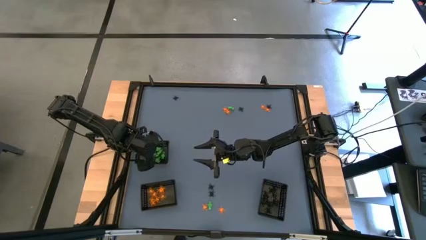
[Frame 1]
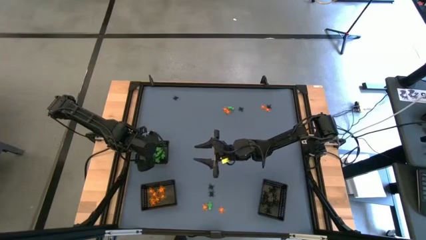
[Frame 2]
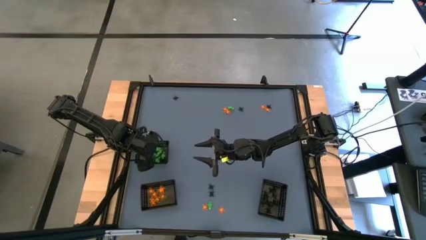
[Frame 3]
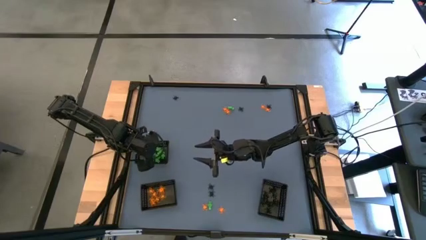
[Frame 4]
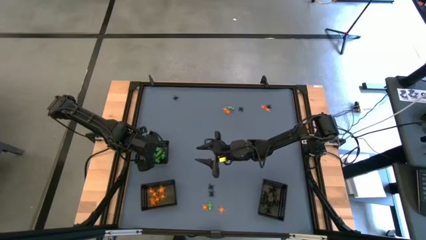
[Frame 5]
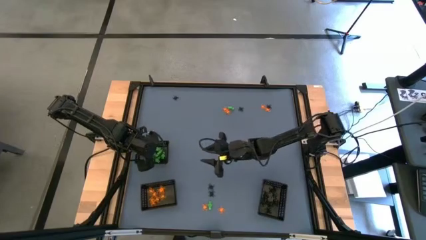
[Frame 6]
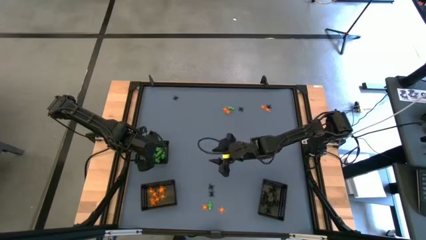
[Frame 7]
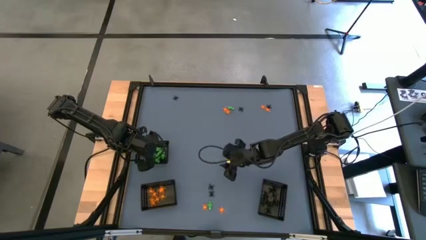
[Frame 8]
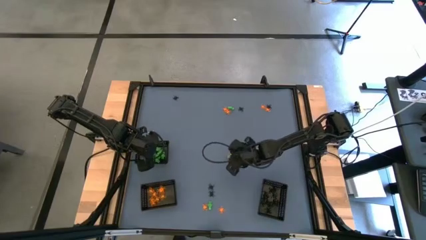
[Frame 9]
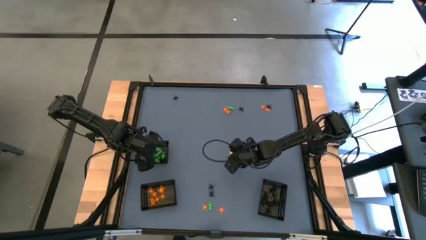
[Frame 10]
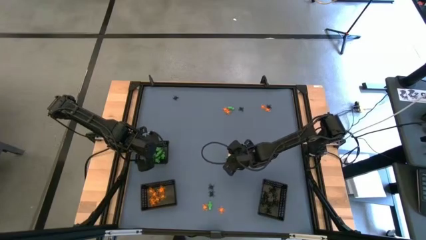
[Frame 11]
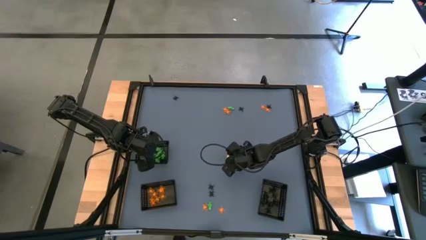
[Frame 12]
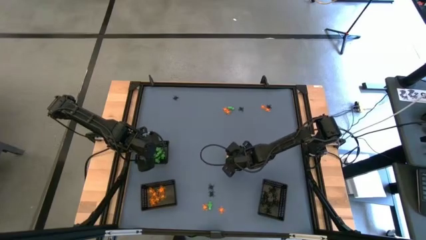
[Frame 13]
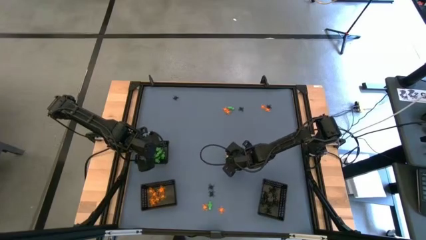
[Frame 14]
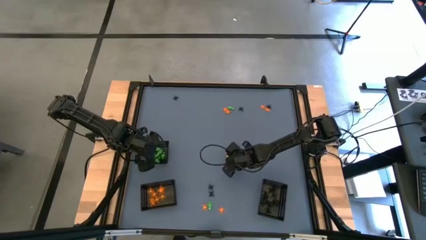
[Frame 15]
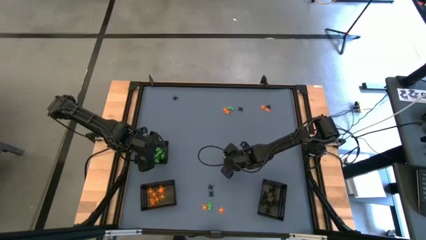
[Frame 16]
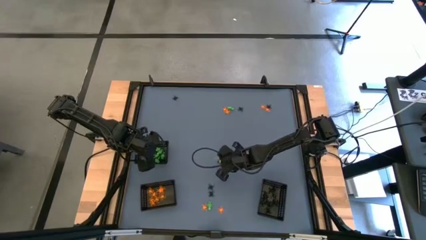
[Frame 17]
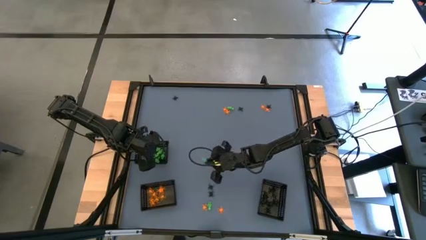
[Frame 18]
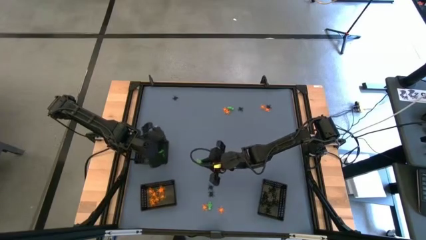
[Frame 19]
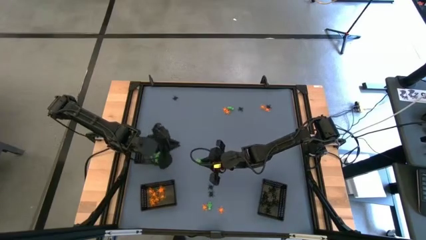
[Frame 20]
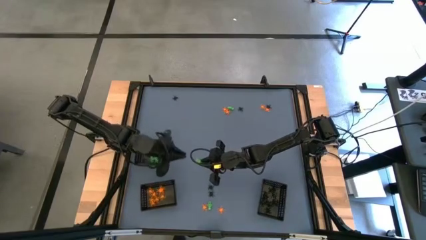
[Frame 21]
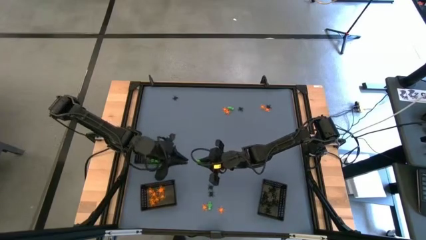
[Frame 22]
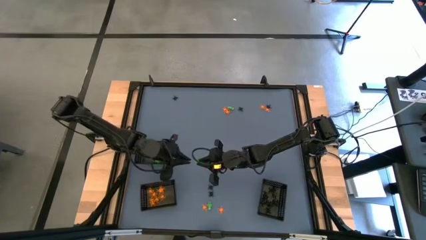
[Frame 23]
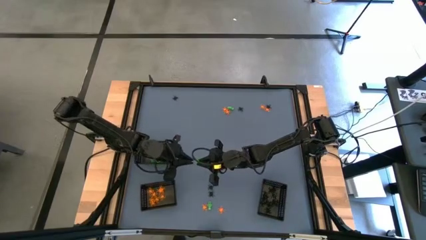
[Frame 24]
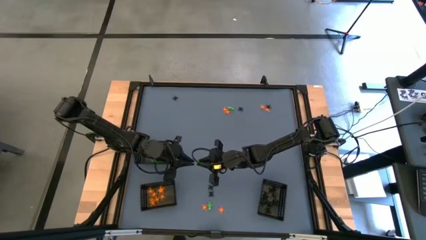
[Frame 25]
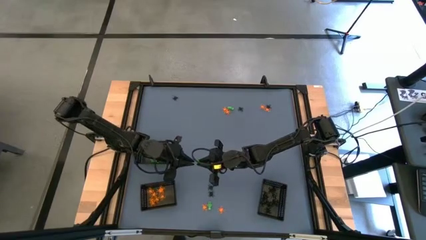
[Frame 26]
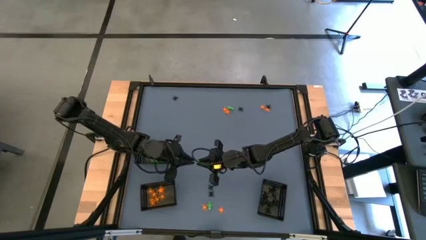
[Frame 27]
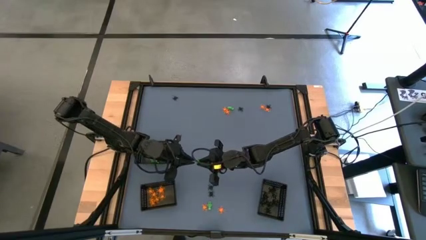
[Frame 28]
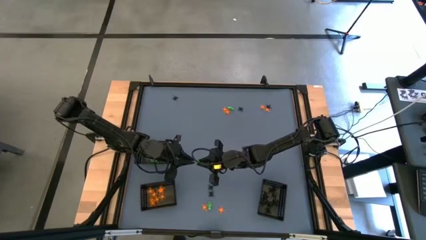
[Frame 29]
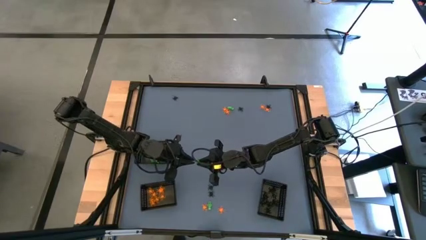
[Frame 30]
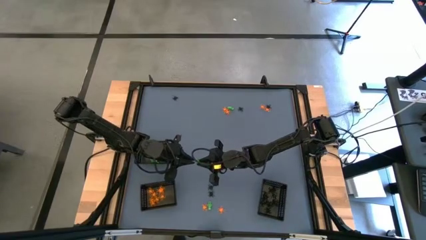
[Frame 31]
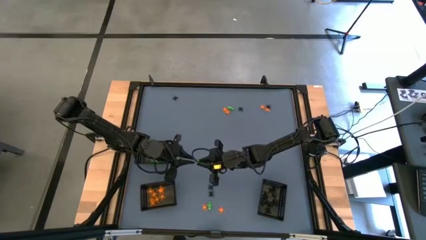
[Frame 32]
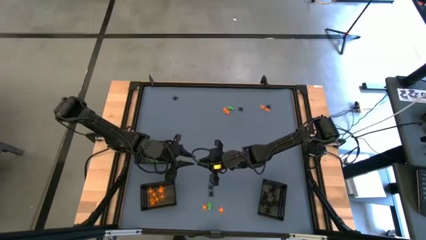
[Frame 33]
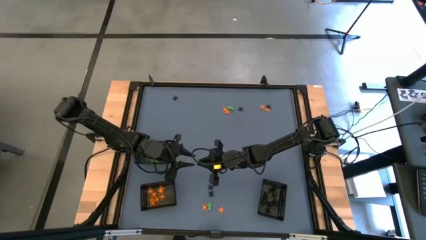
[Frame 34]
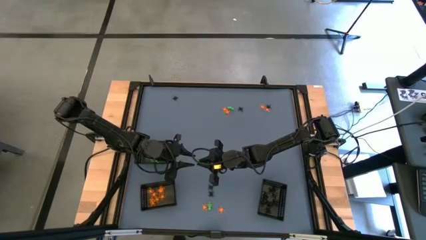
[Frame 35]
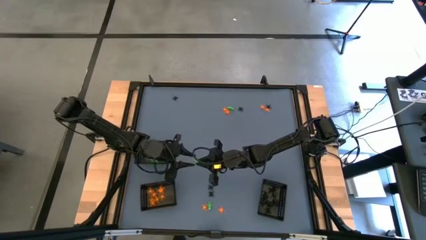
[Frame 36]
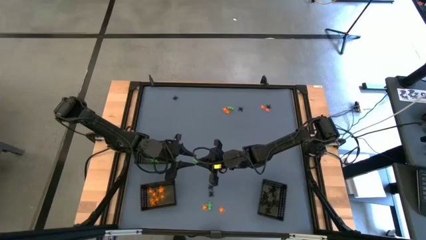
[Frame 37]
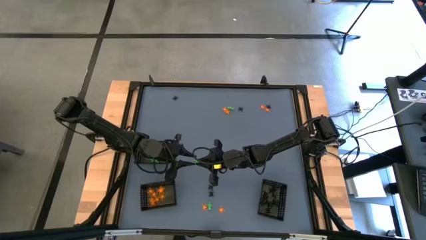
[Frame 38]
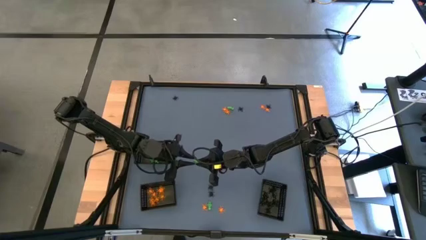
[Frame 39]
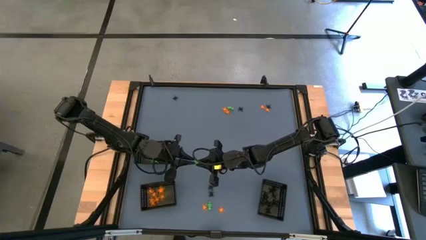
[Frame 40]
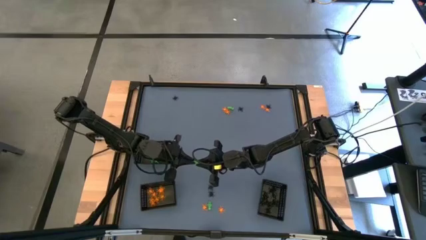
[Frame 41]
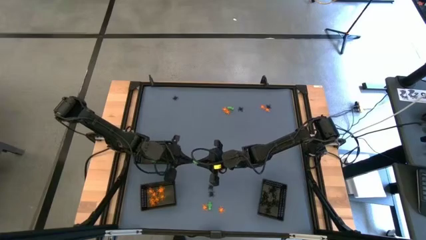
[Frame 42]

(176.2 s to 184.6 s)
Task: Sort Halloween decoration
Put the green skeleton toy into the top black bin

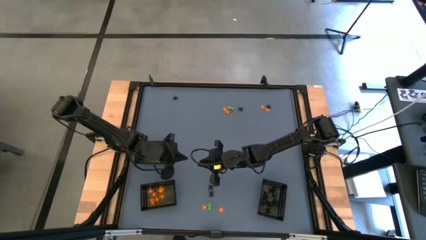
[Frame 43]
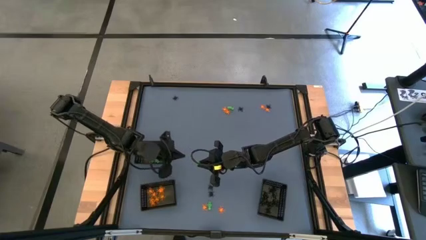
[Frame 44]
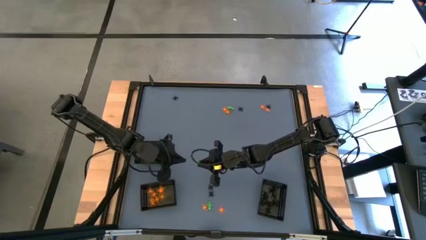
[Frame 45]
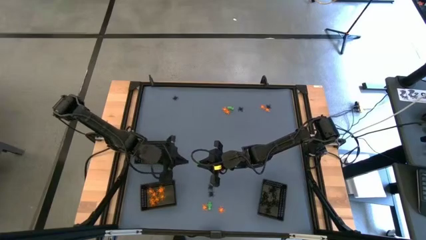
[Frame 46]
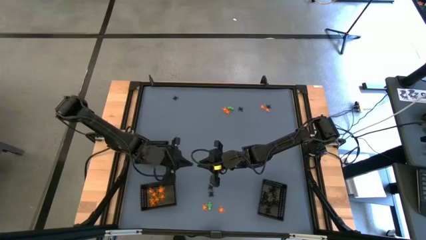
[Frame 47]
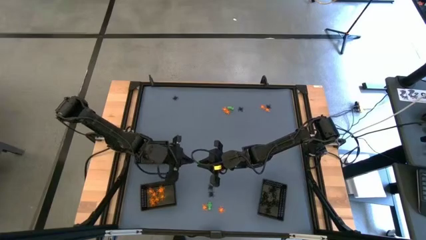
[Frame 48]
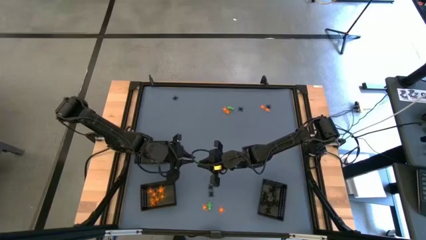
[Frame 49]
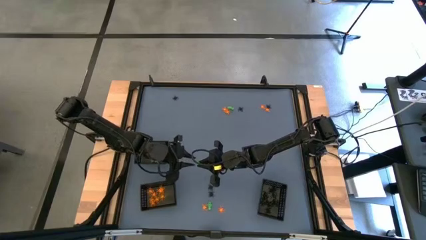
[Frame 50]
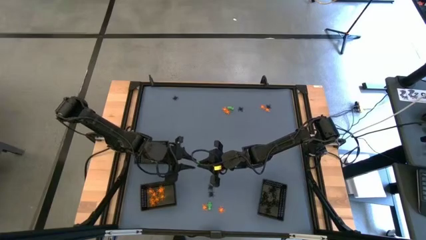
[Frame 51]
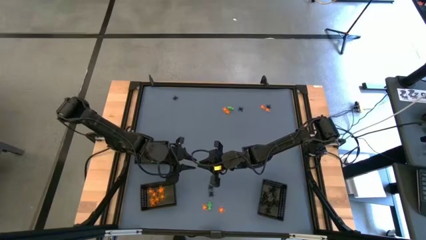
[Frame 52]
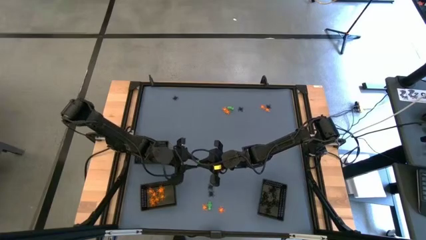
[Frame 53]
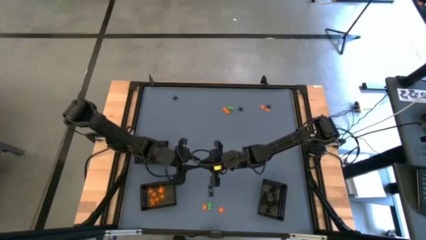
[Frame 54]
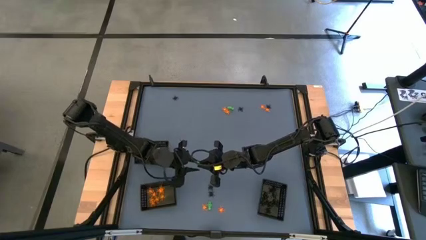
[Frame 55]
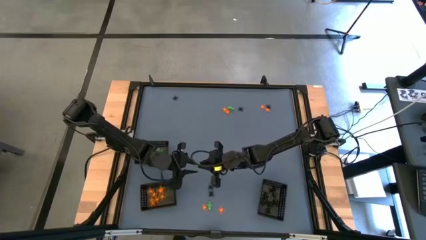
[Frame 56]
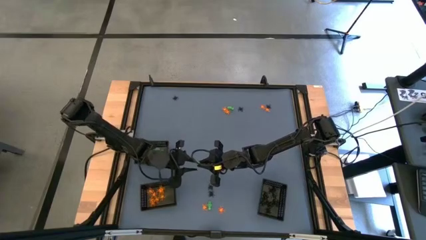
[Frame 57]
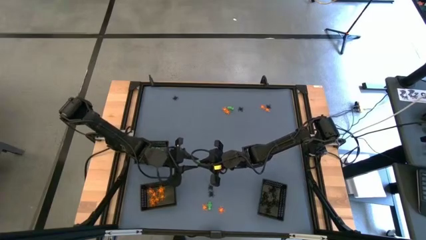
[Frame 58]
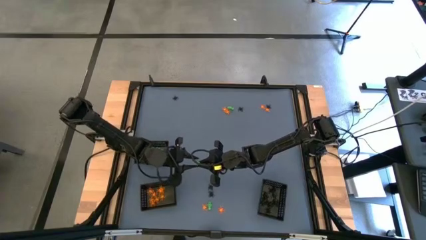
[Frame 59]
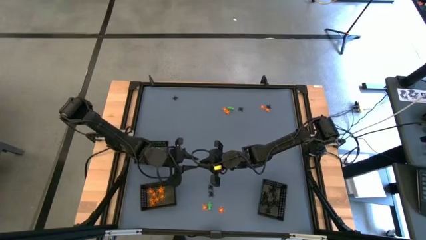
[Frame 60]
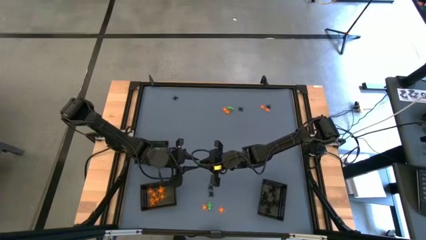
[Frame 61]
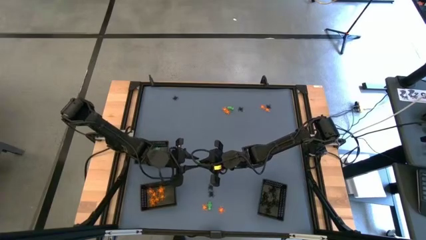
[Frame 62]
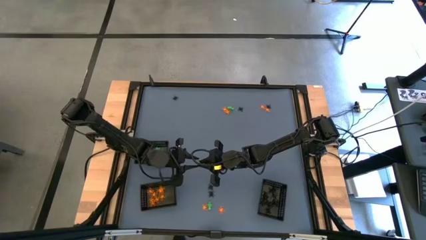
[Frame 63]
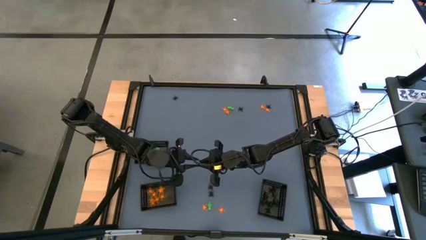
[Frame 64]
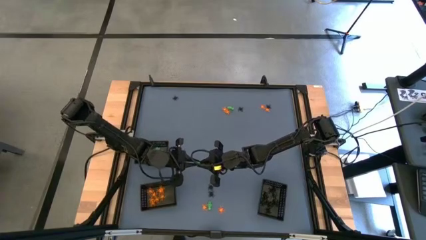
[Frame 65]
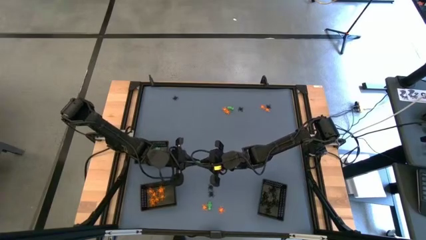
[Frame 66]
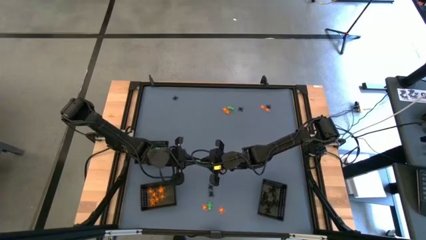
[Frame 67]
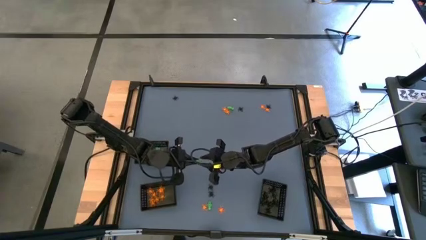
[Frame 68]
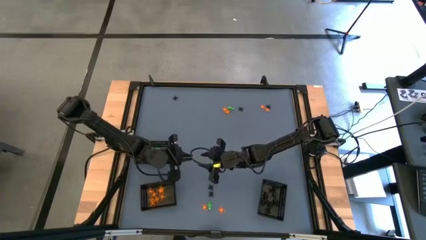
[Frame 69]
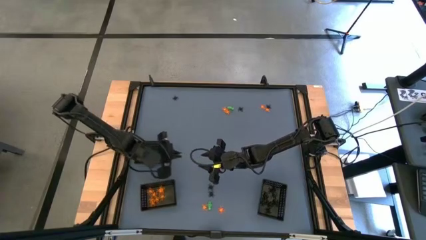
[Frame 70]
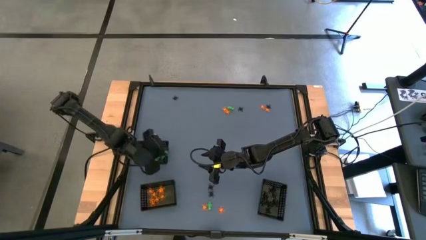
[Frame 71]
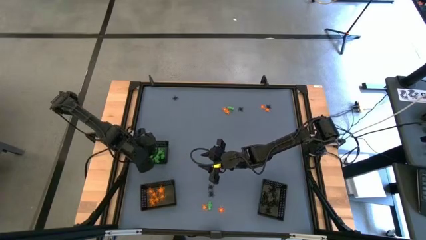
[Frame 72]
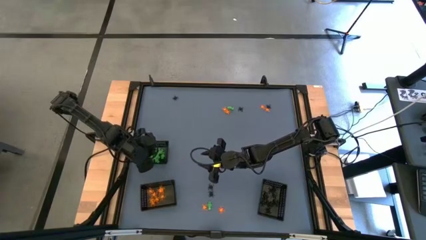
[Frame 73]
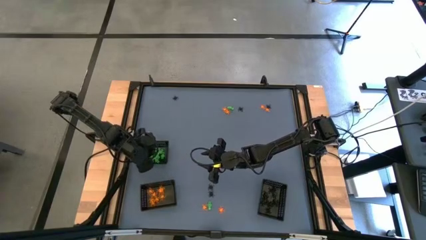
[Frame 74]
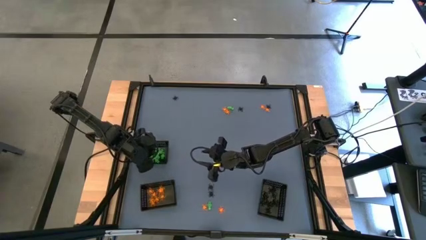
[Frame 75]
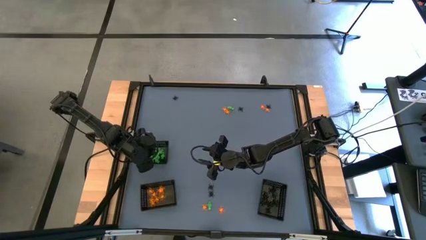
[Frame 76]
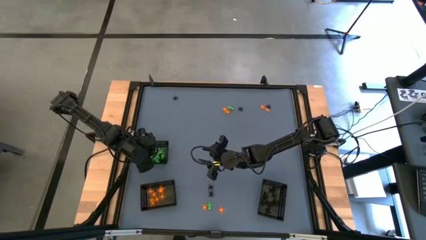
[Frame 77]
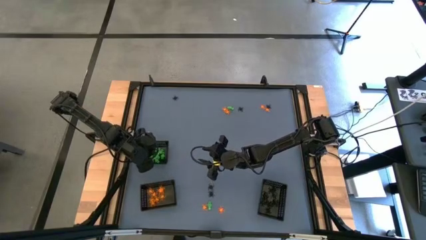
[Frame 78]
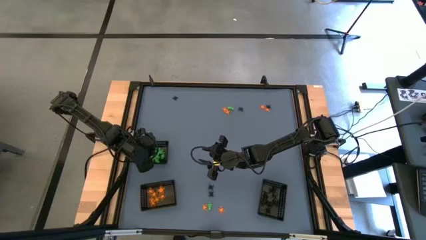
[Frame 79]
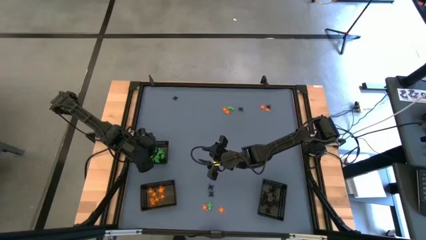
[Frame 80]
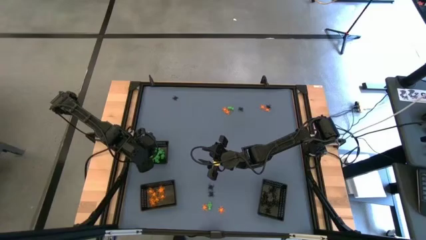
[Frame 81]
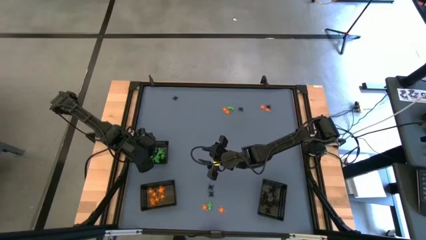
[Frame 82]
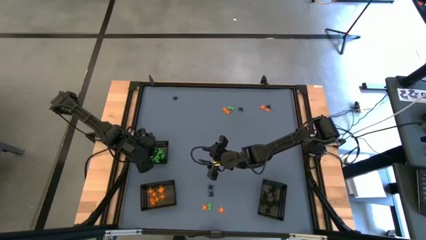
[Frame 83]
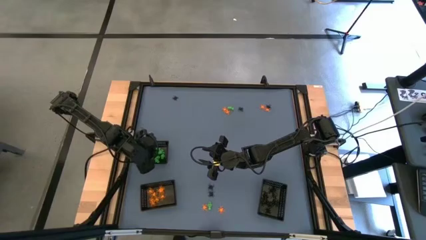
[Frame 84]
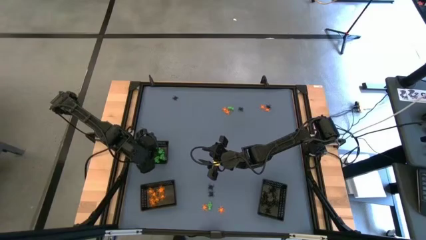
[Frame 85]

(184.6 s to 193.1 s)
Put the green skeleton toy into the top black bin
